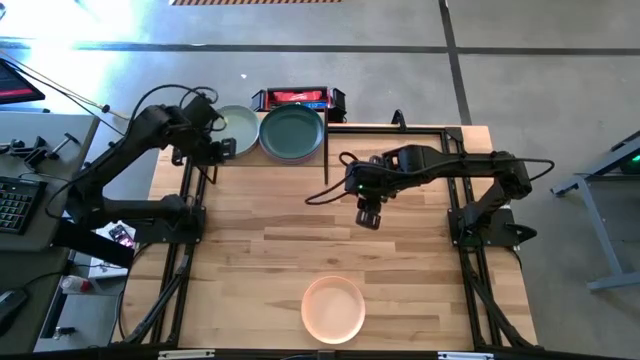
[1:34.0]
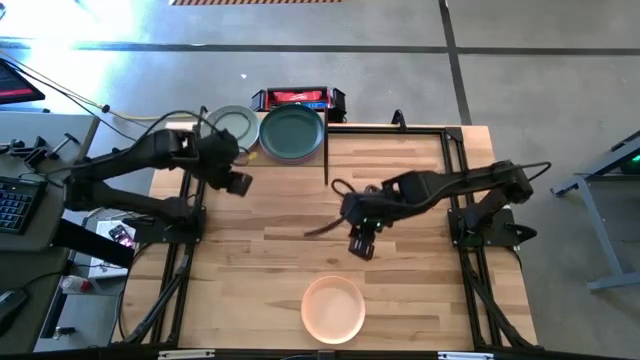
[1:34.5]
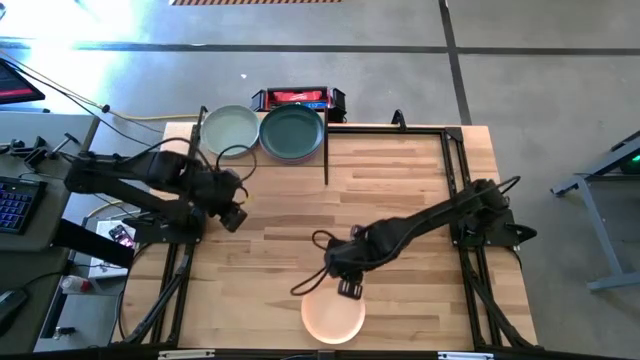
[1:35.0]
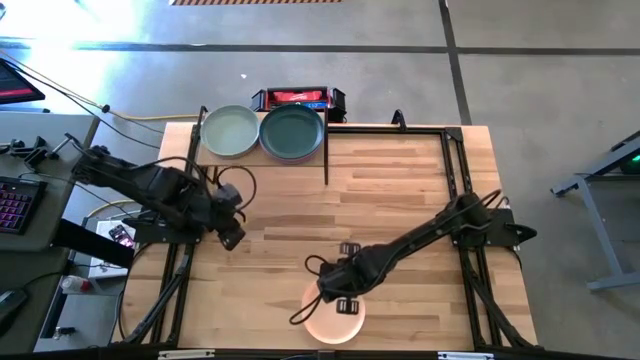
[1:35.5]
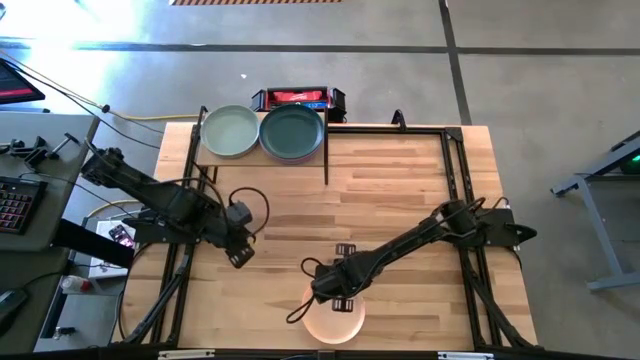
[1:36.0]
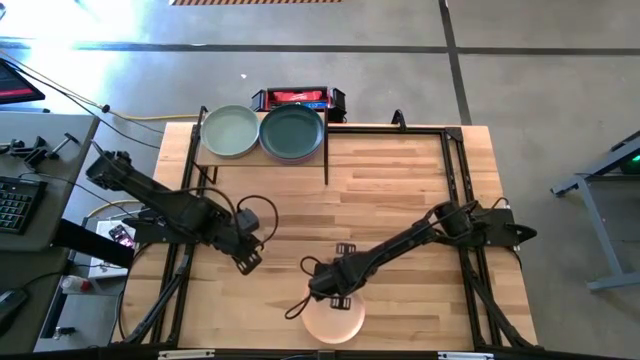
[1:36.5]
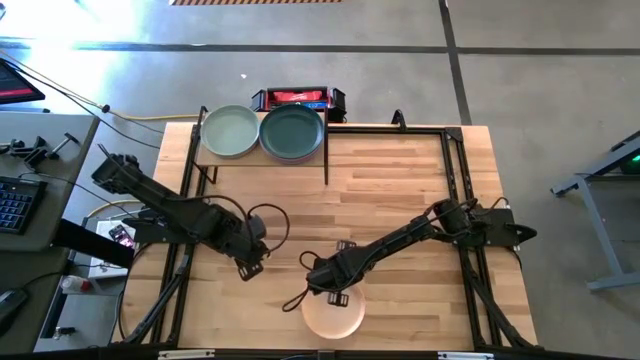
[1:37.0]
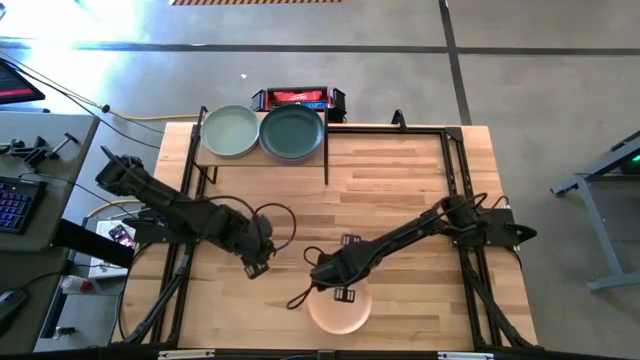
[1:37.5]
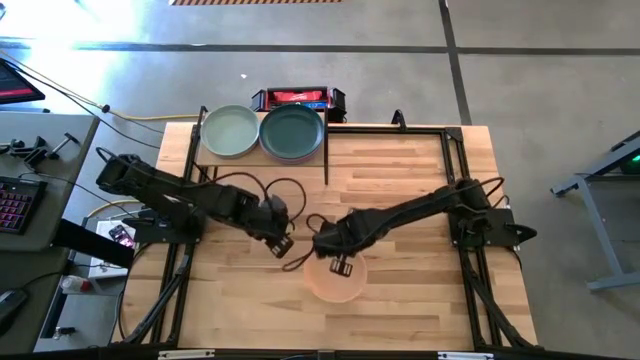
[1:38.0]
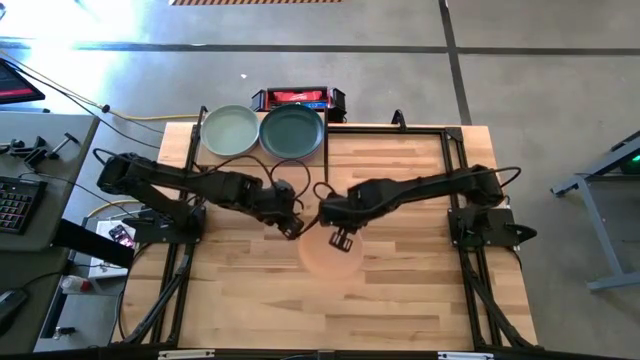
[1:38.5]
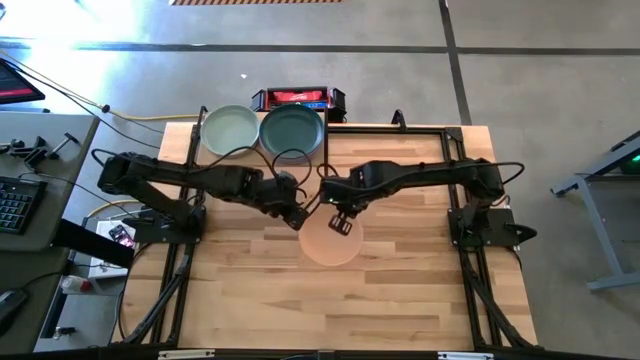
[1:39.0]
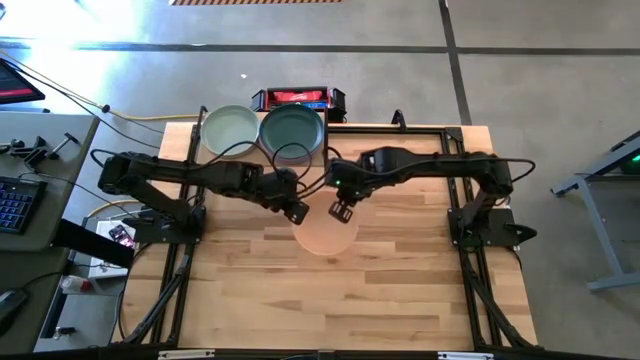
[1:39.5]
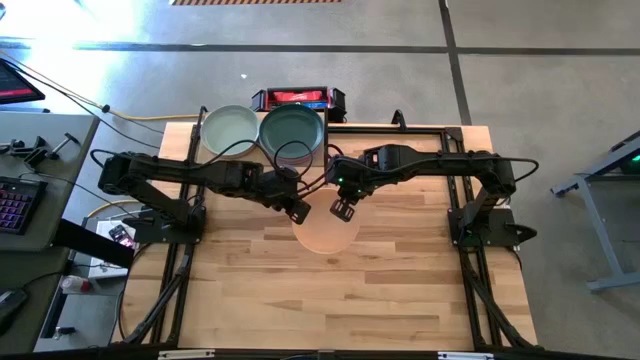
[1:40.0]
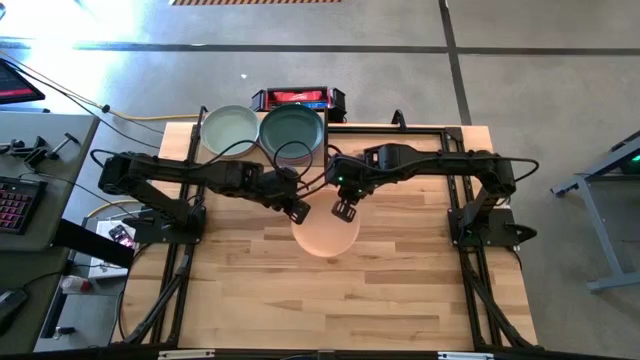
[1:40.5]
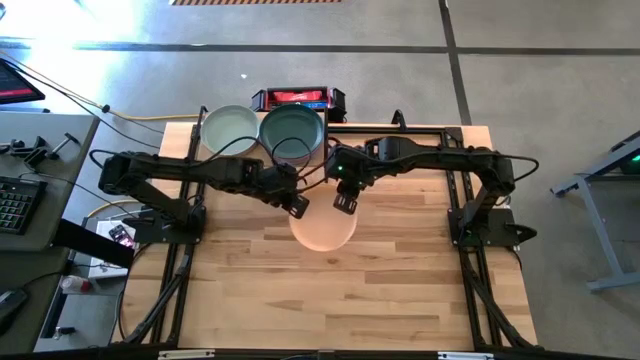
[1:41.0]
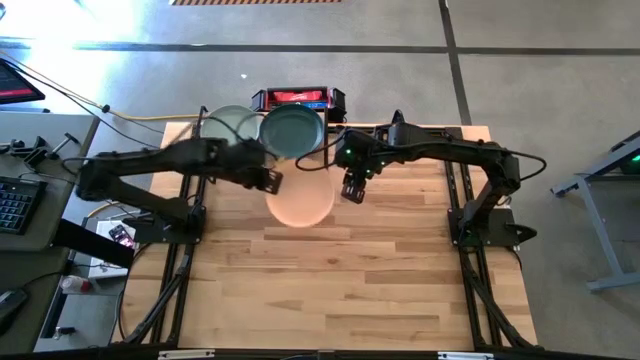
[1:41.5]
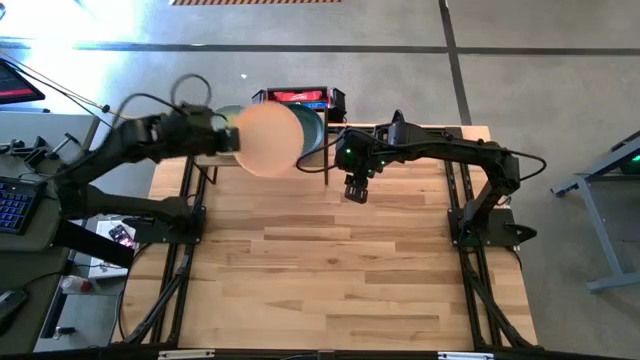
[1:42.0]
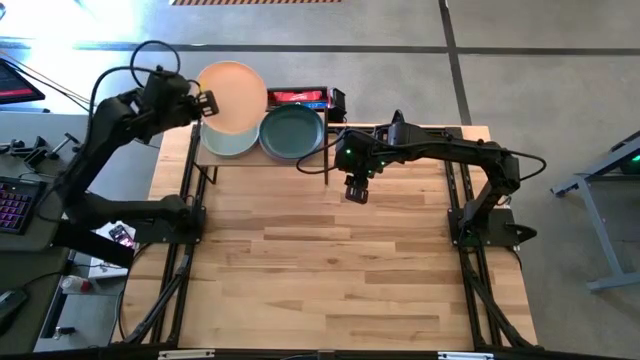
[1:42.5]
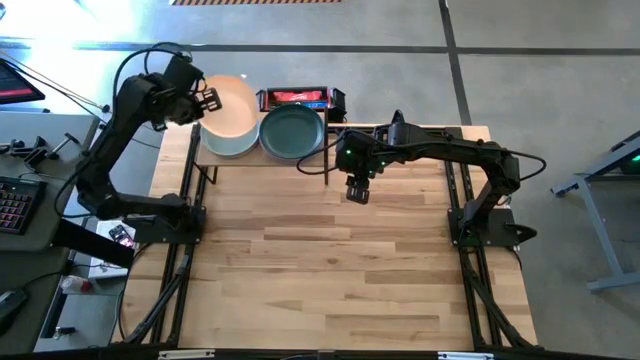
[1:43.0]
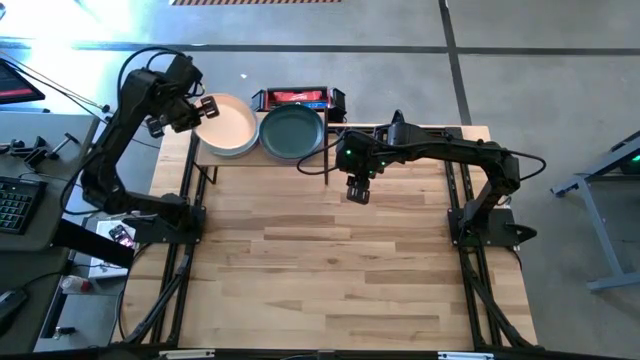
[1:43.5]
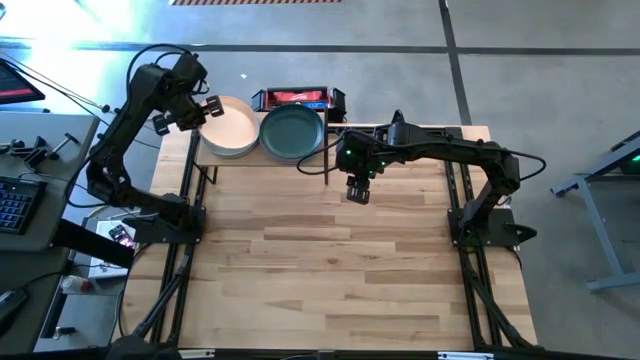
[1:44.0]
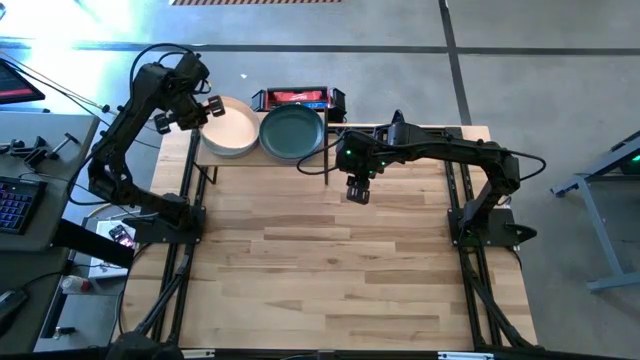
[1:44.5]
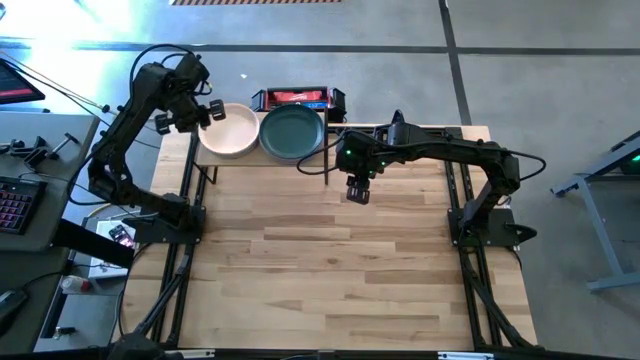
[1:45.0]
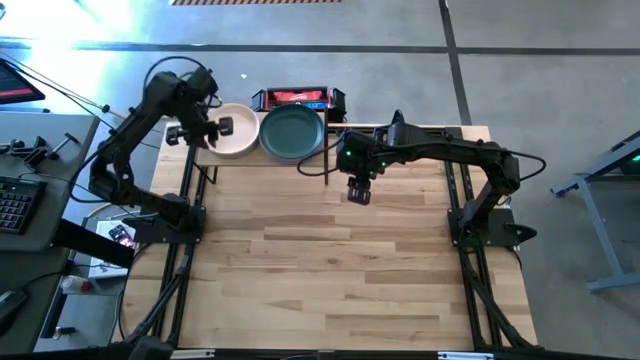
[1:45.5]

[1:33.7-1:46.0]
Task: Place and stack plates onto a shelf
Stack the light red plate on top of the light green plate on the shelf

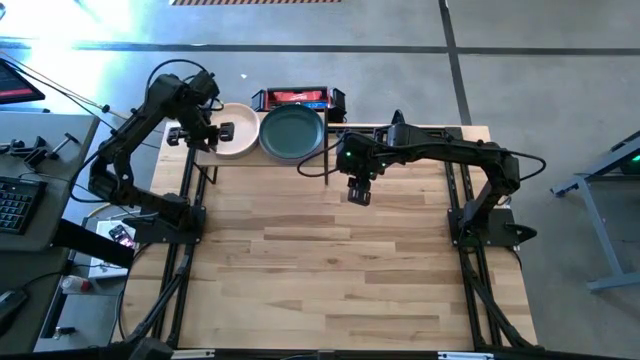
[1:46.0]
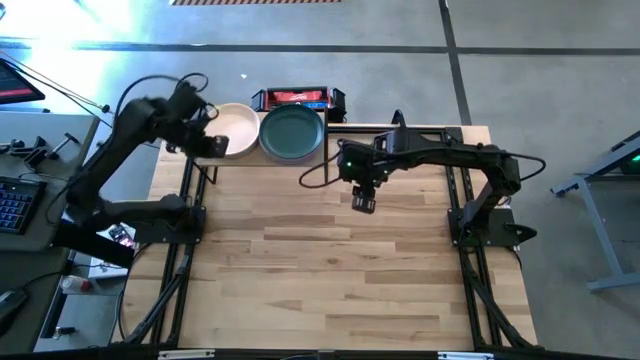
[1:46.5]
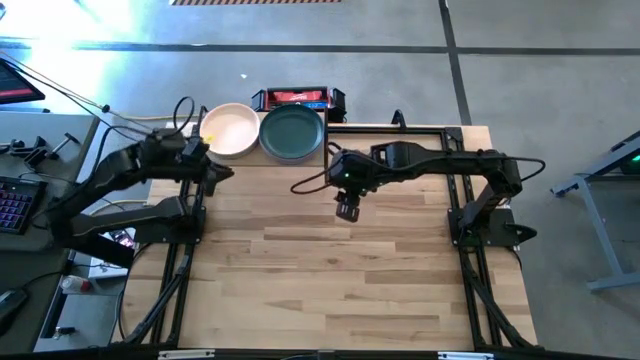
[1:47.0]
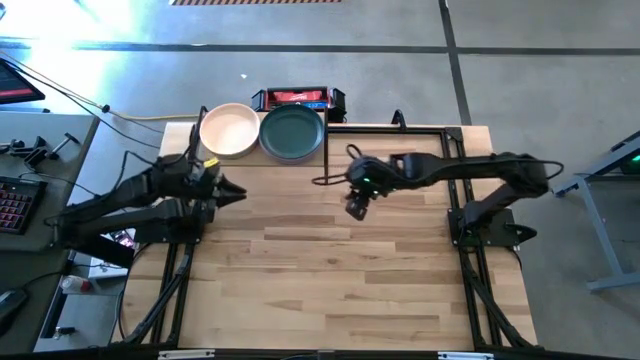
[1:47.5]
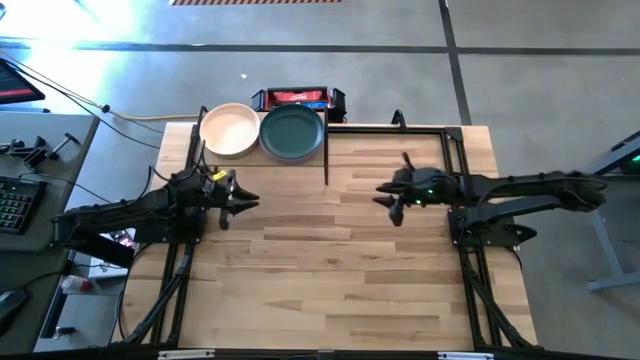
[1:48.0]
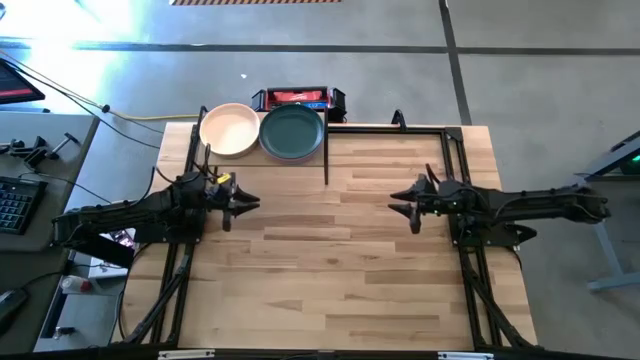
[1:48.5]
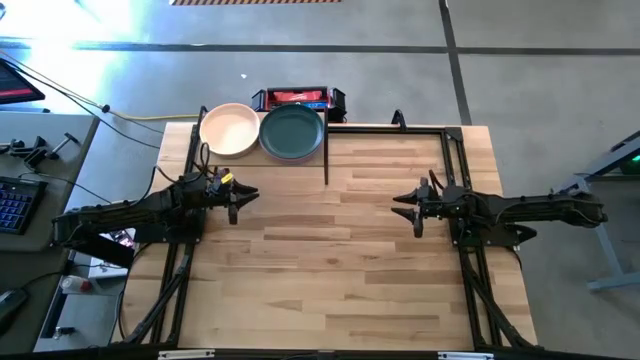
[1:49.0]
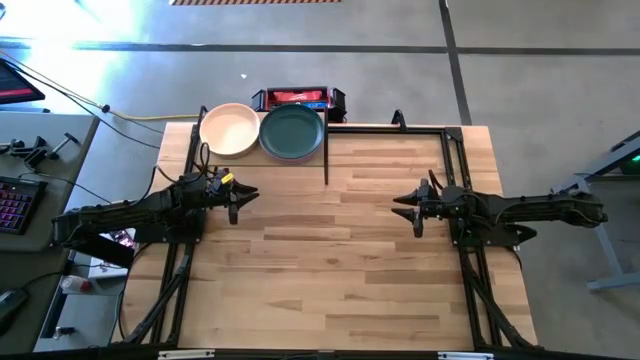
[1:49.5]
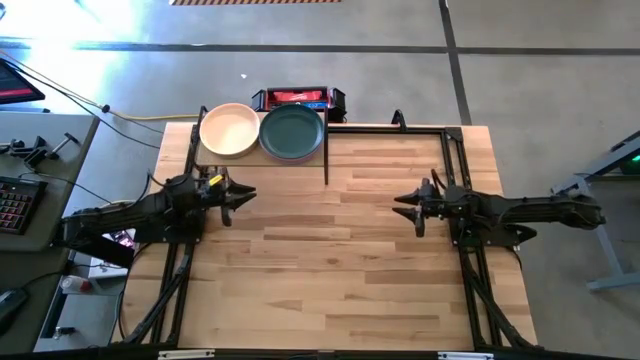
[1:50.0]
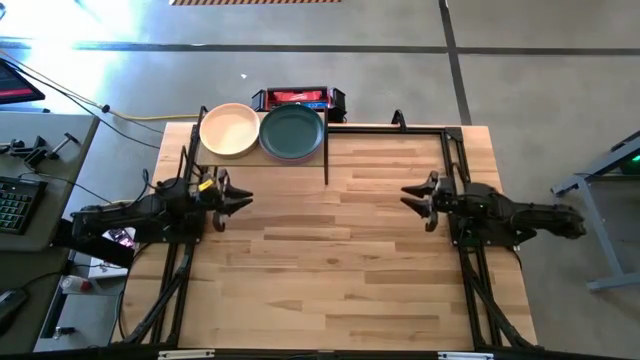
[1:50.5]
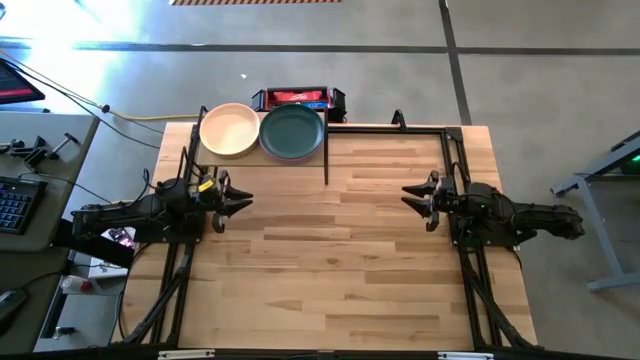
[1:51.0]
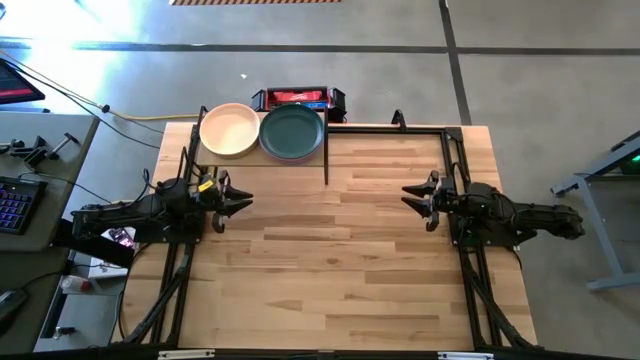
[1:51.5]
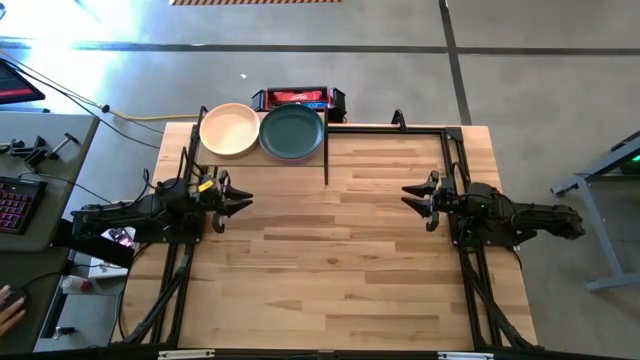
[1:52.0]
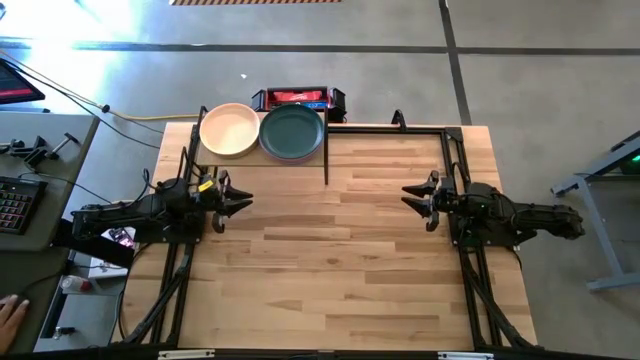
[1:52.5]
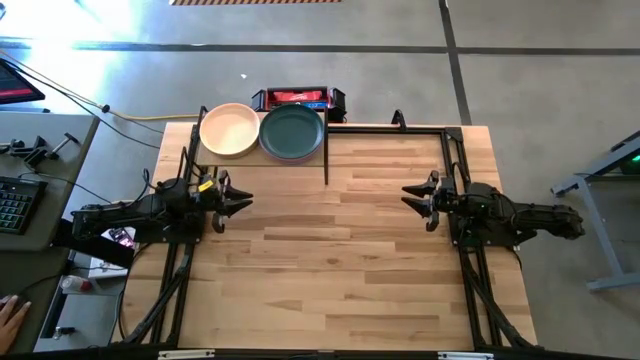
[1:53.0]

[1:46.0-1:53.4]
Return to Home Position

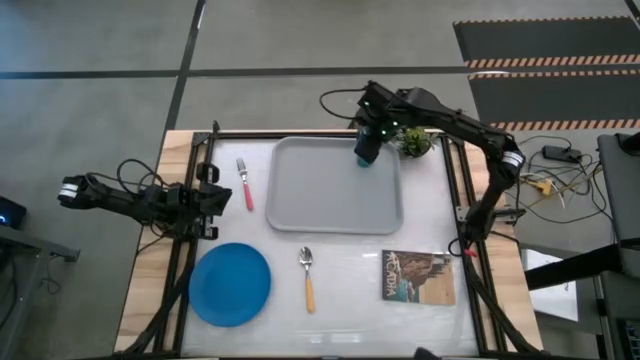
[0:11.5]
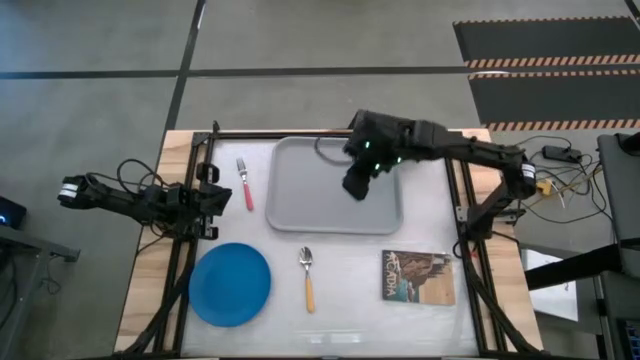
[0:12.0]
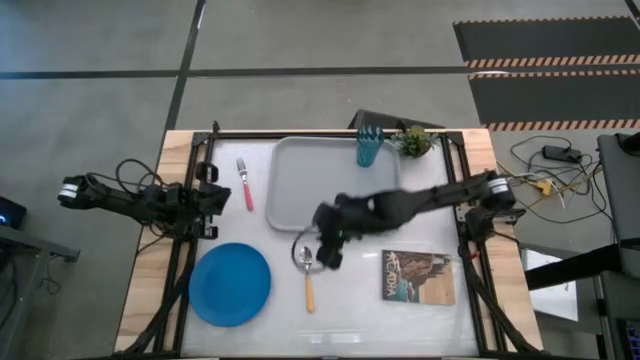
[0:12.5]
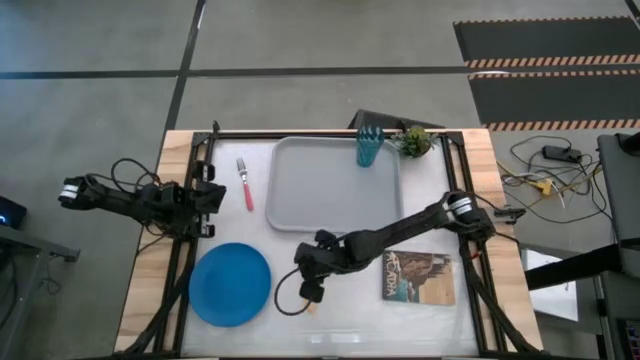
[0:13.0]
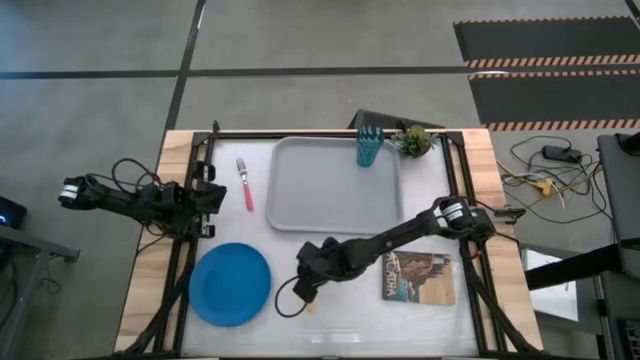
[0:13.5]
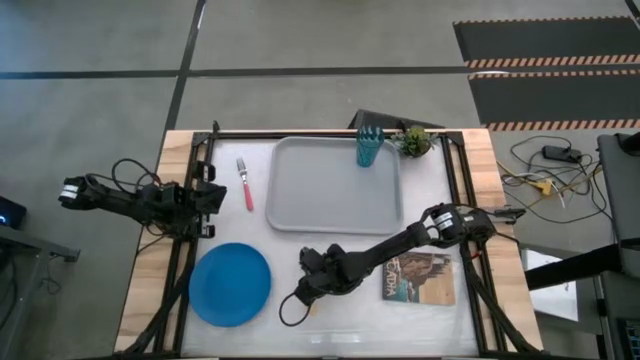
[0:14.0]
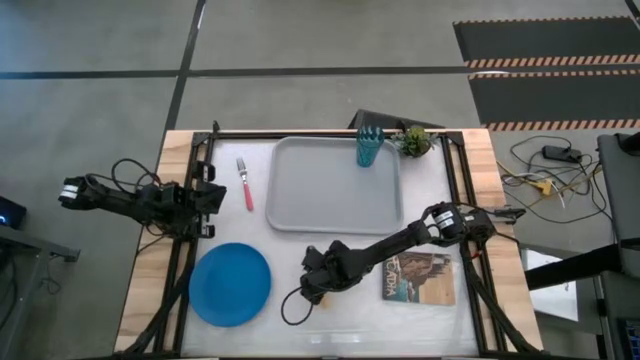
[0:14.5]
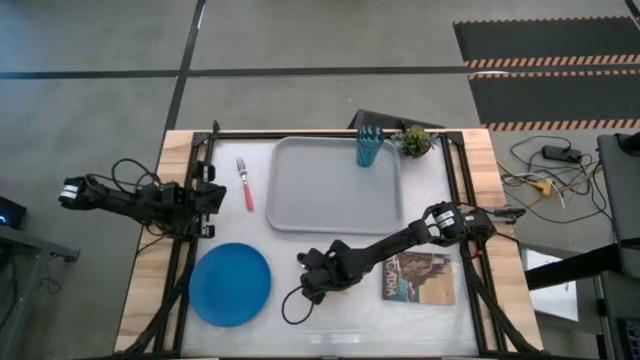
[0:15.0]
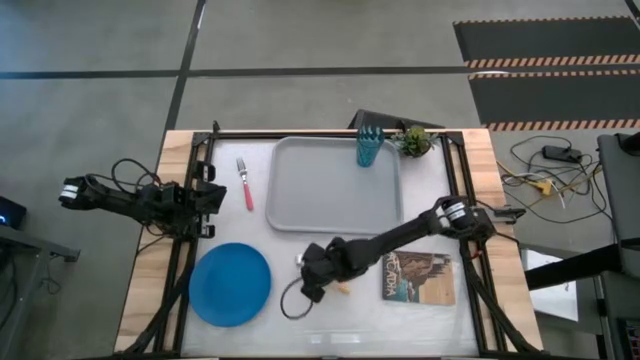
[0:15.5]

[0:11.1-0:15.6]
Task: Pick and place plate/cup/fork/spoon on tray
Put the yellow spoon to the left side of the tray
